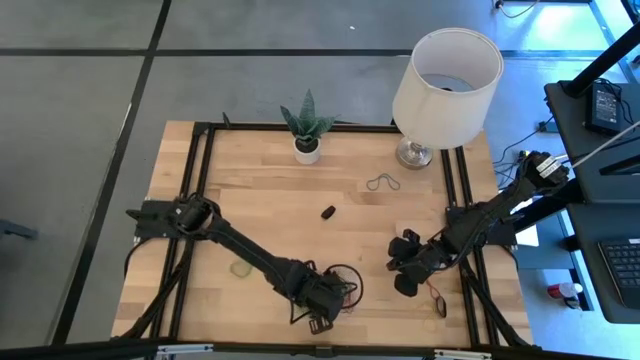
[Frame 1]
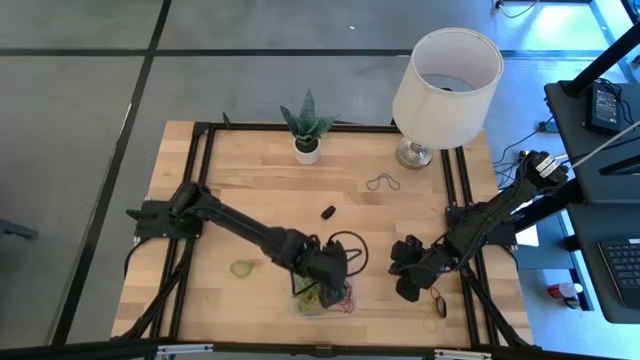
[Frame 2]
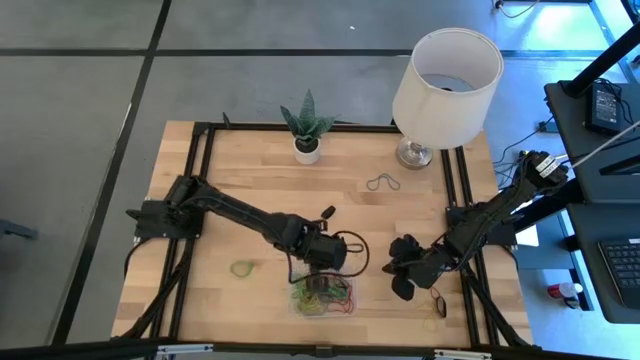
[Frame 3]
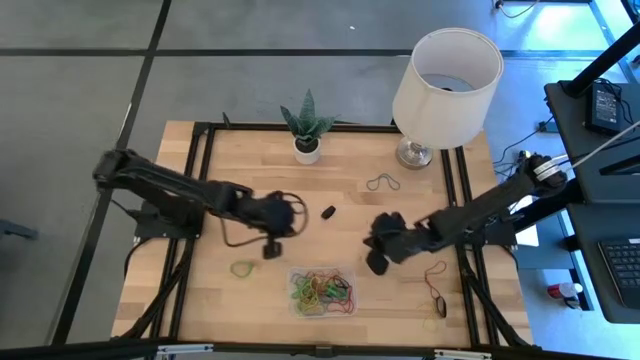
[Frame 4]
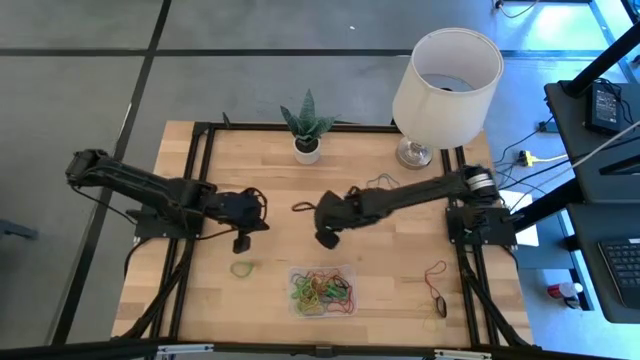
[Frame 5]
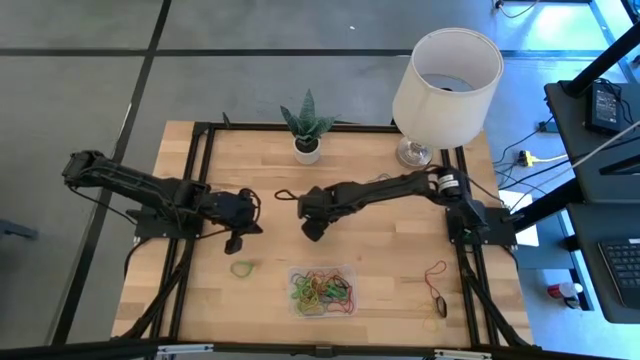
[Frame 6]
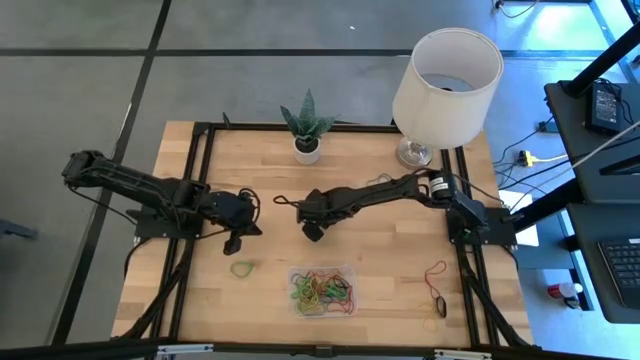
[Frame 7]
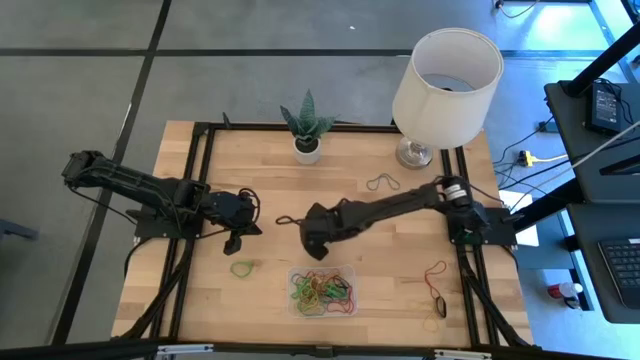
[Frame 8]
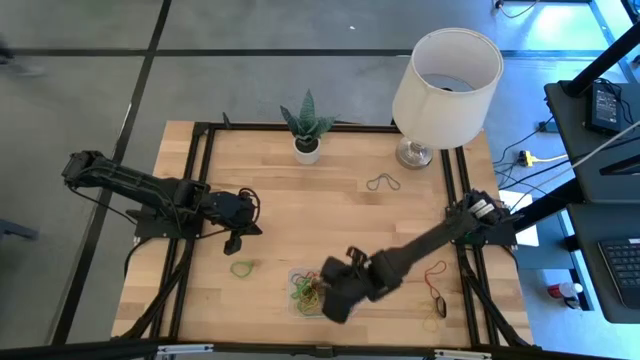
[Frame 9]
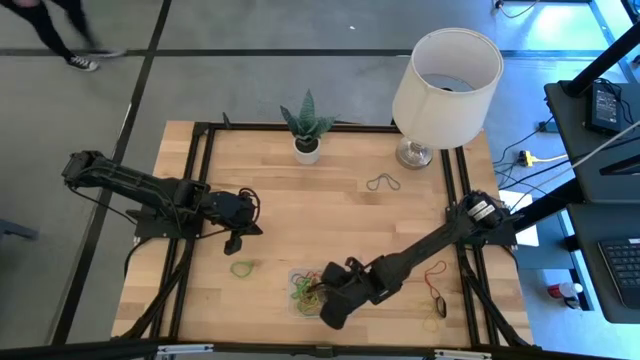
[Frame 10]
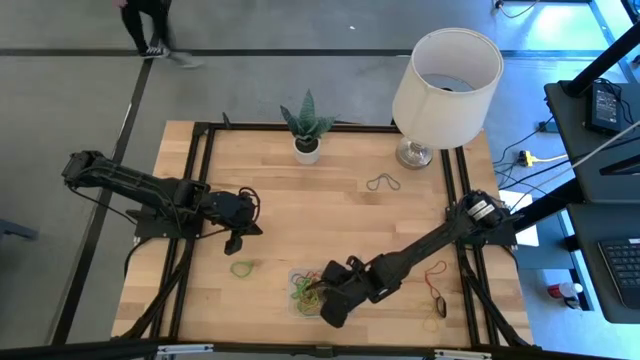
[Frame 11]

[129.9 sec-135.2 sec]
Task: Pick and place rubber bands into bin
Put the black rubber band into the transparent bin

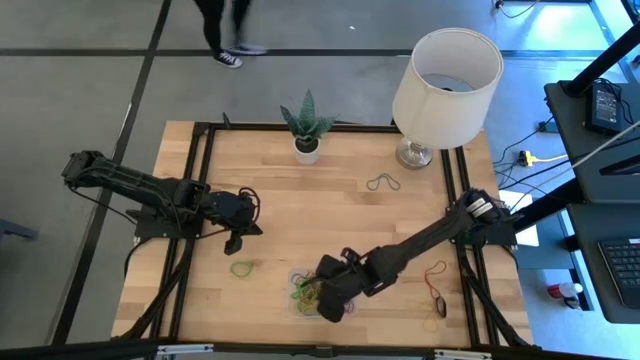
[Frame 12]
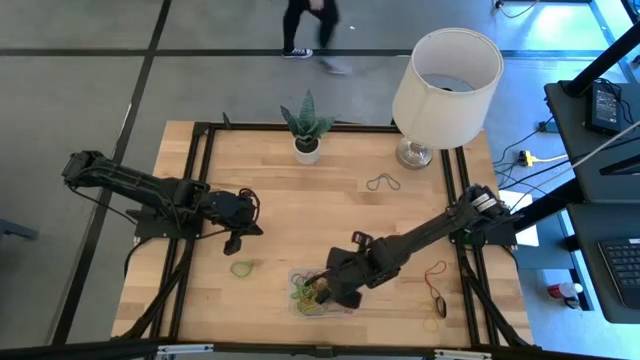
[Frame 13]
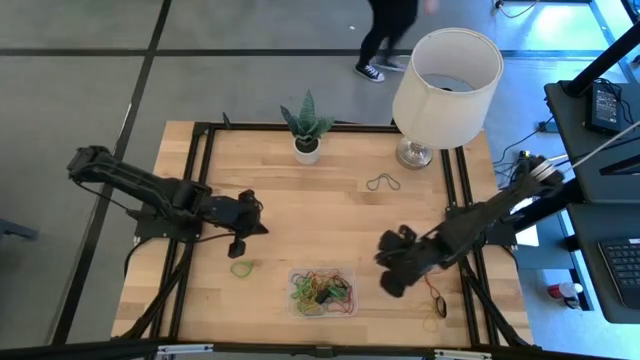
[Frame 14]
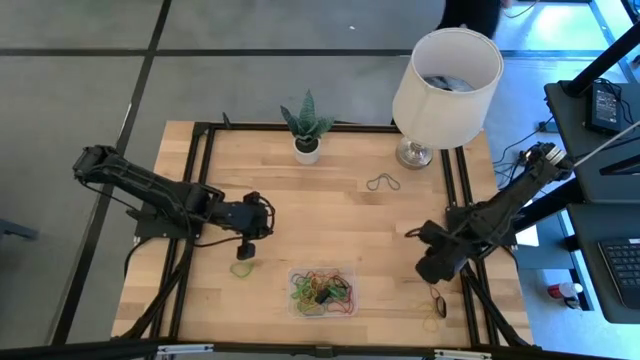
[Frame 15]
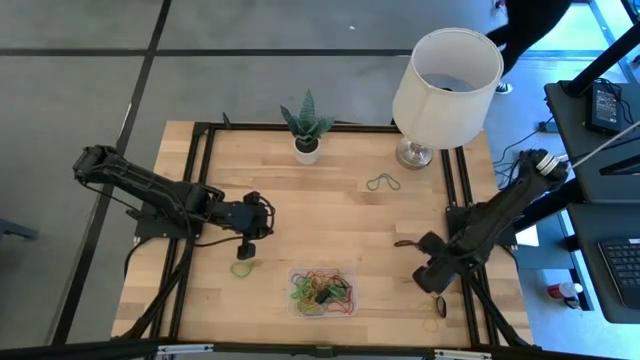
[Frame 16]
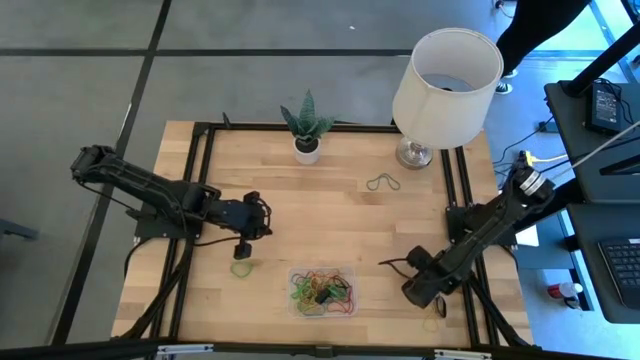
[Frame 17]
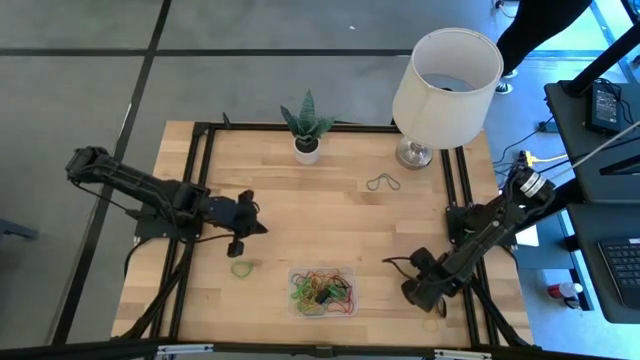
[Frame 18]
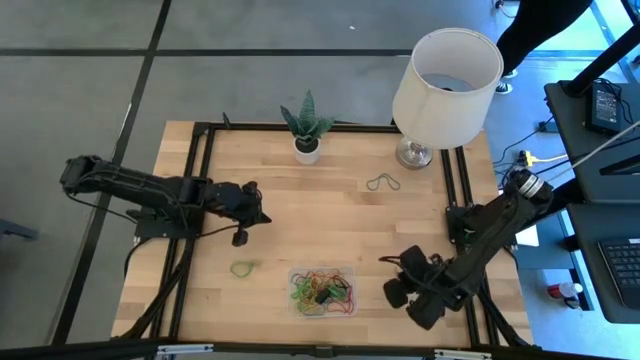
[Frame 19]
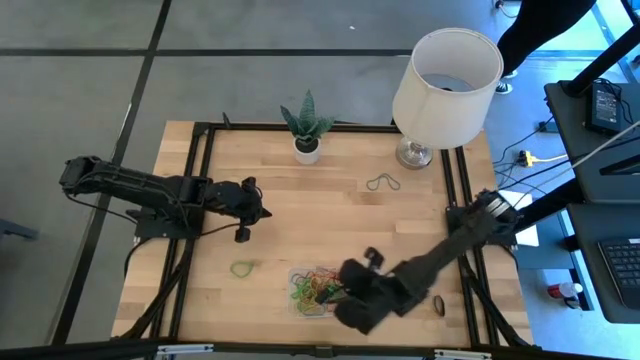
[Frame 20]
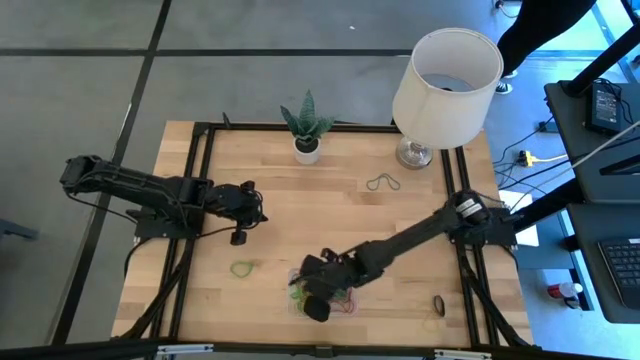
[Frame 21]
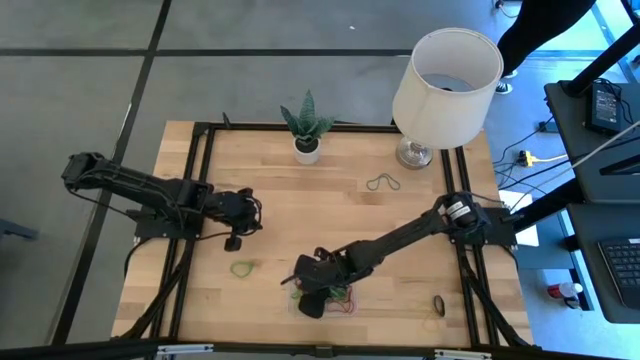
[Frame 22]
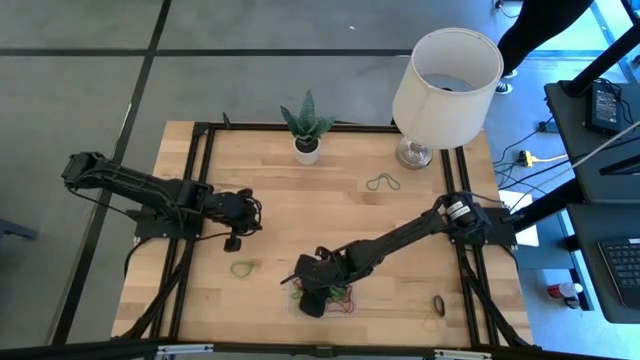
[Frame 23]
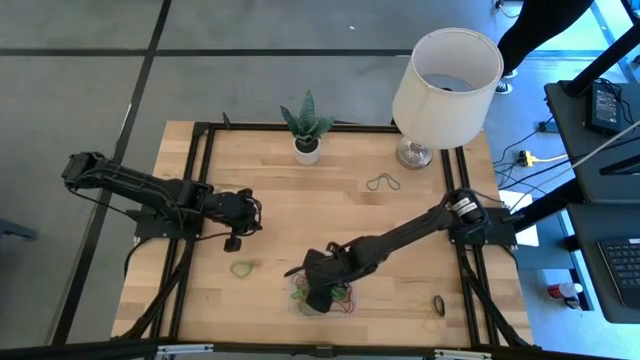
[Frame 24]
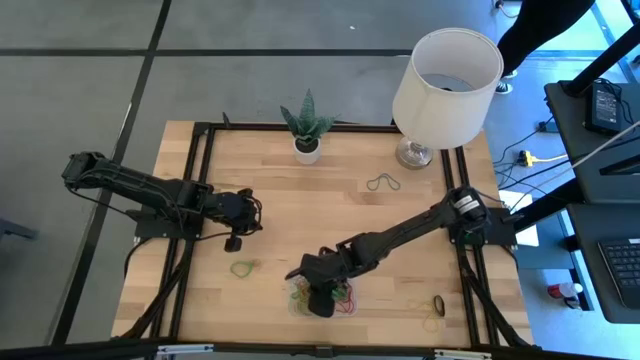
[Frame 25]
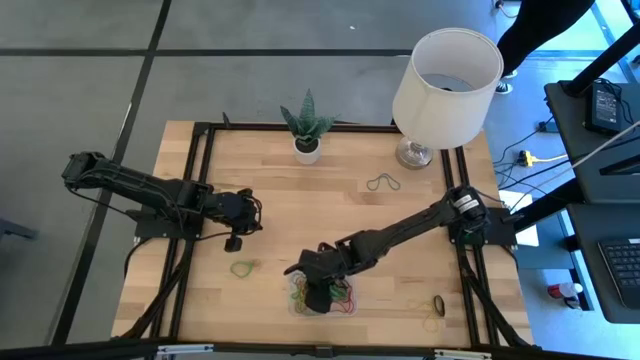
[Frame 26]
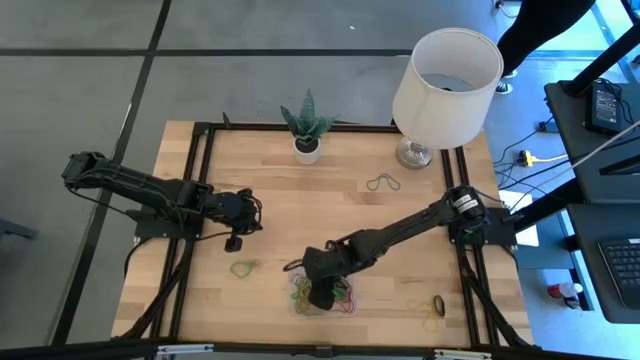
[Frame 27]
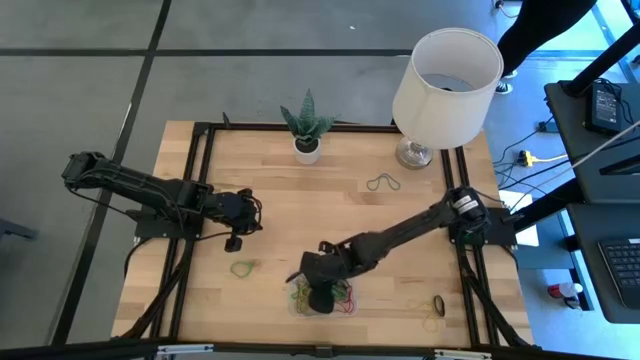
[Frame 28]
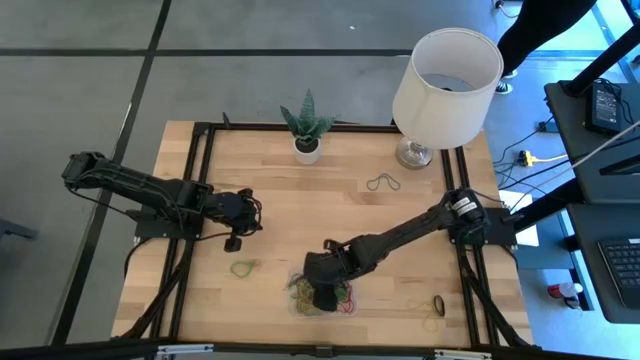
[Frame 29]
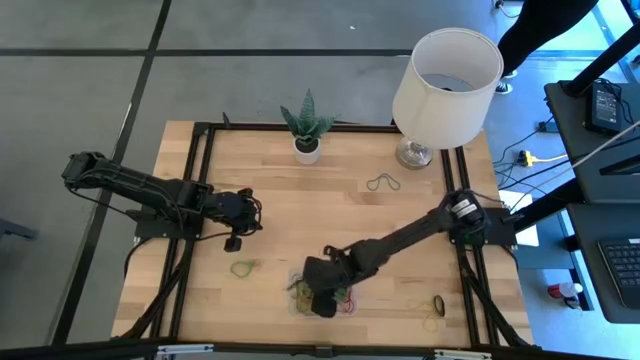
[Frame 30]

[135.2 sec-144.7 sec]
Put the red rubber band into the transparent bin

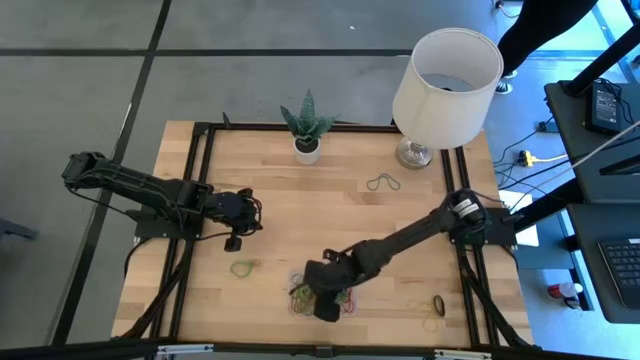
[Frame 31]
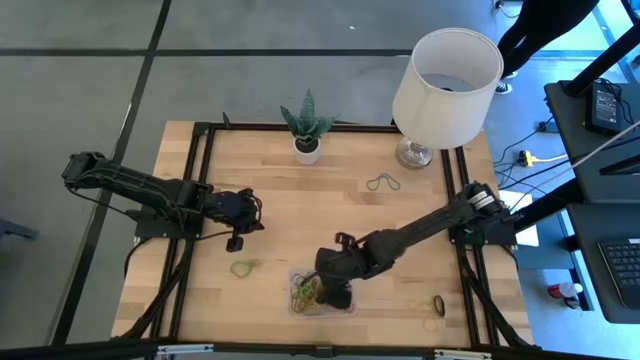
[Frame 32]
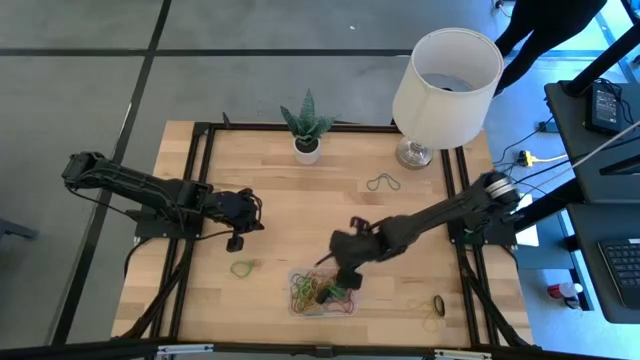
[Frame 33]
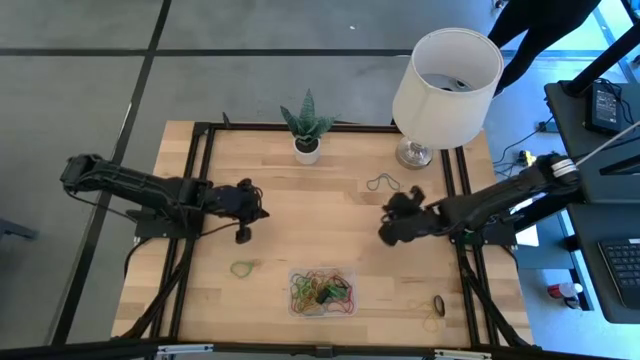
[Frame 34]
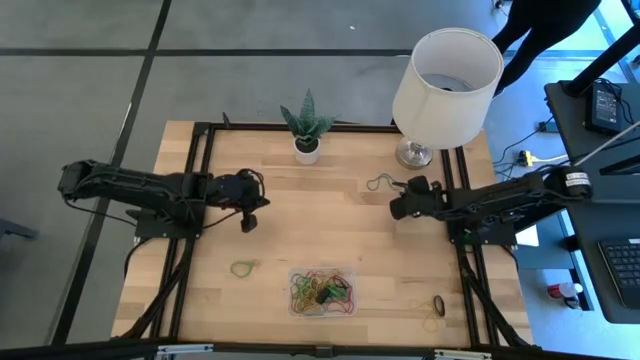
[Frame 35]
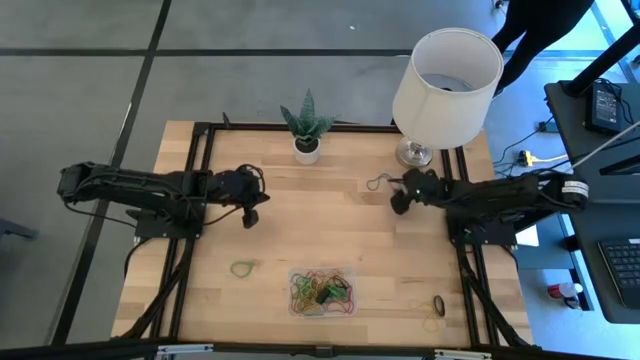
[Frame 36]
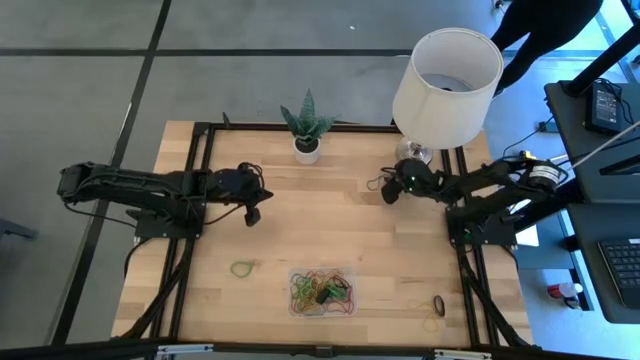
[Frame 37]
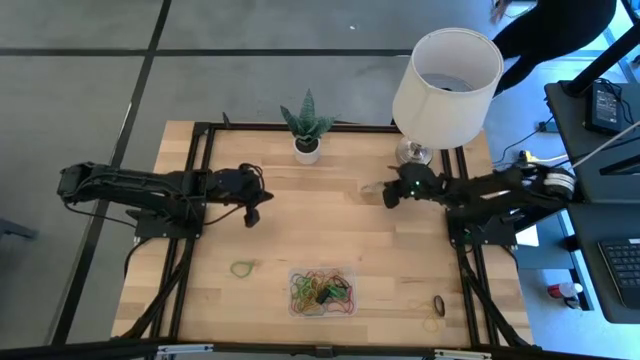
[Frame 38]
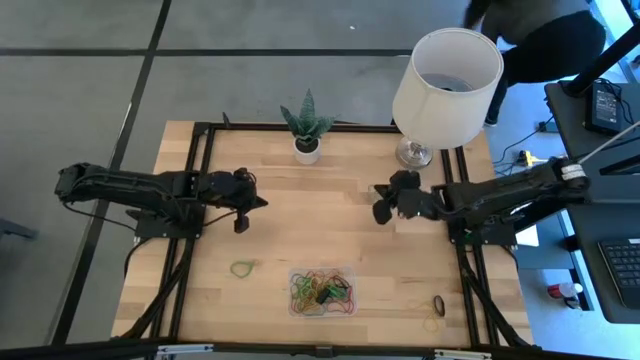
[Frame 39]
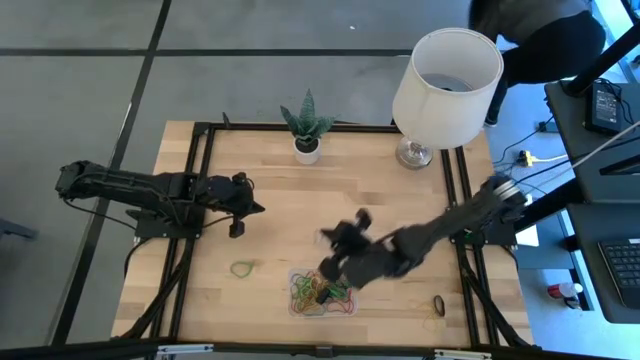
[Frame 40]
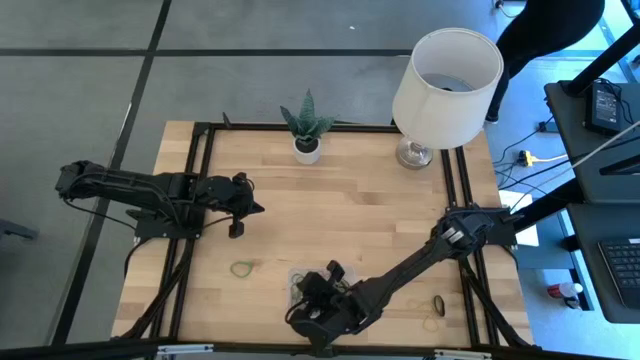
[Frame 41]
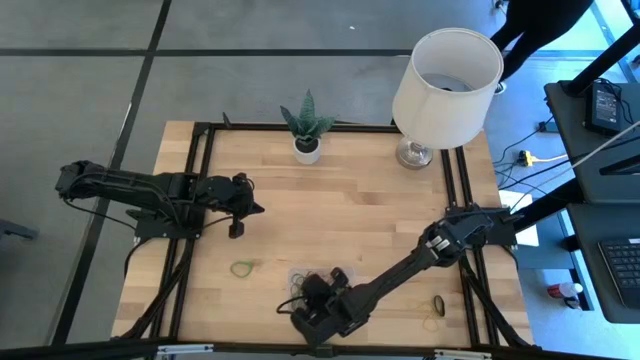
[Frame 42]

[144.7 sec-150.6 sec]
Put the blue rubber band into the transparent bin

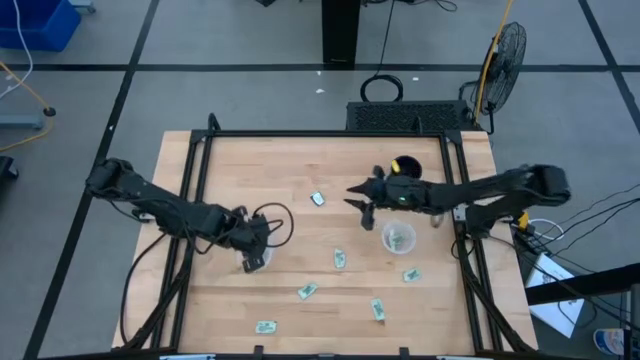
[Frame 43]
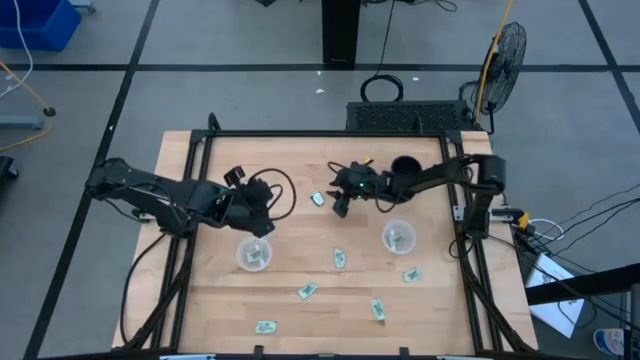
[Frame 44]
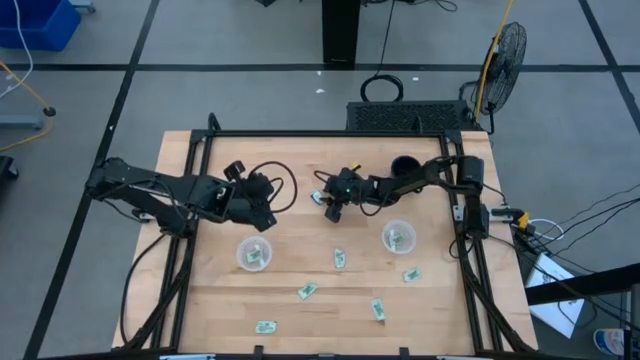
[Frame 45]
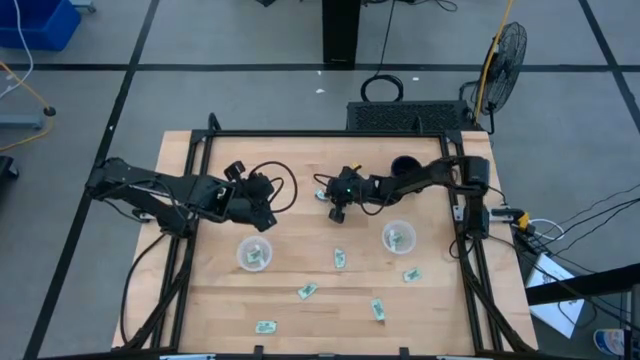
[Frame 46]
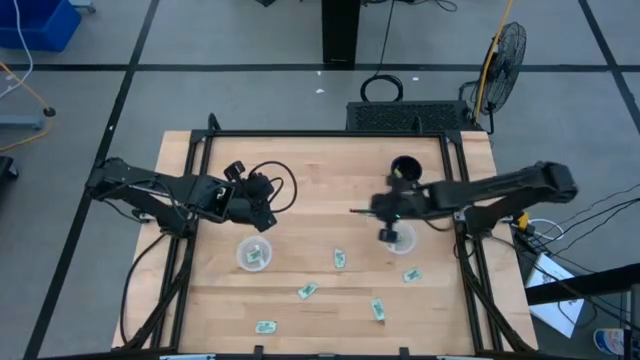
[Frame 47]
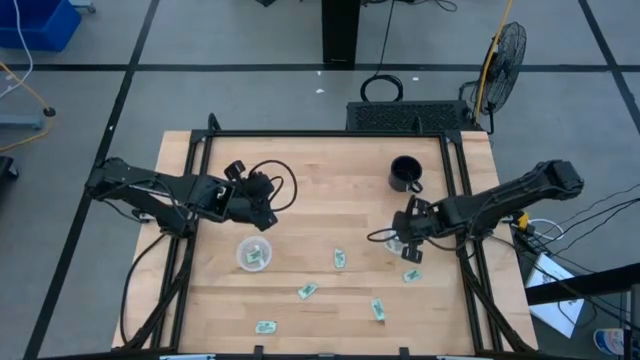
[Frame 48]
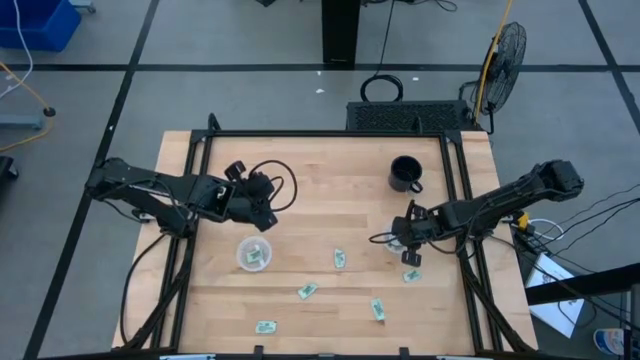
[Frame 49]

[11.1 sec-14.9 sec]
Task: Pick and place items into bin
Put the green stevia packet into the right transparent bin
